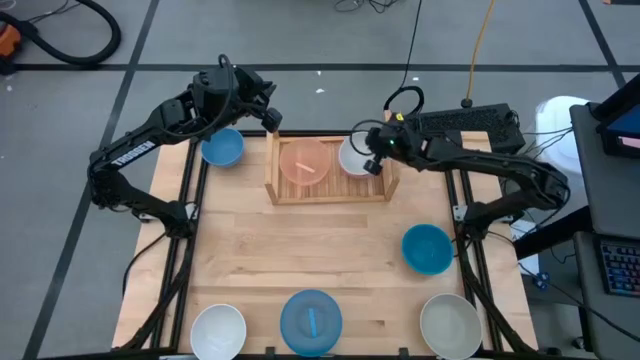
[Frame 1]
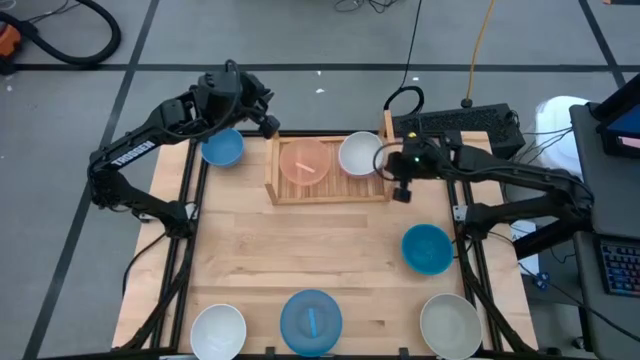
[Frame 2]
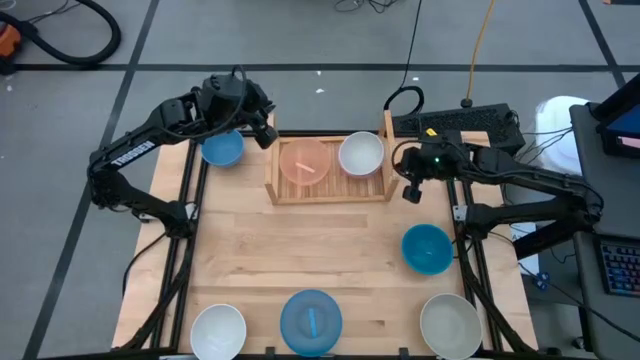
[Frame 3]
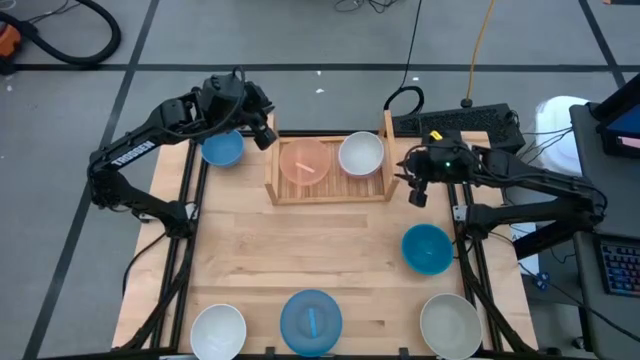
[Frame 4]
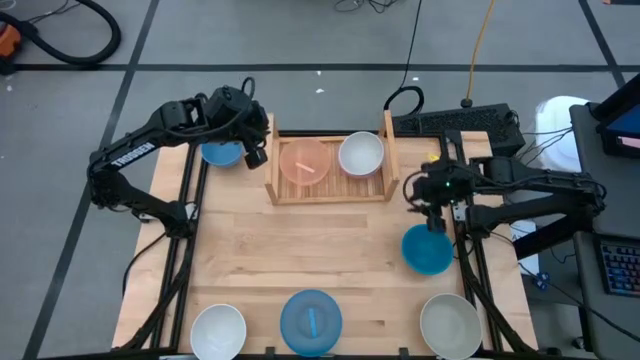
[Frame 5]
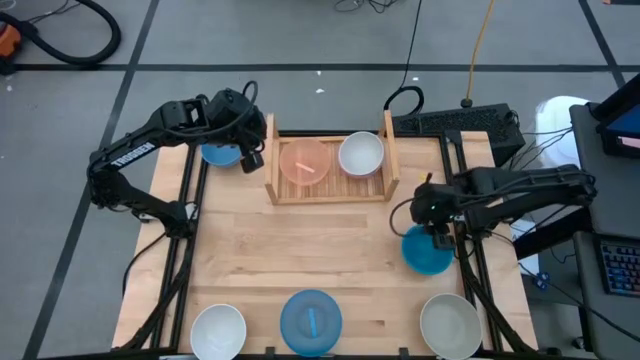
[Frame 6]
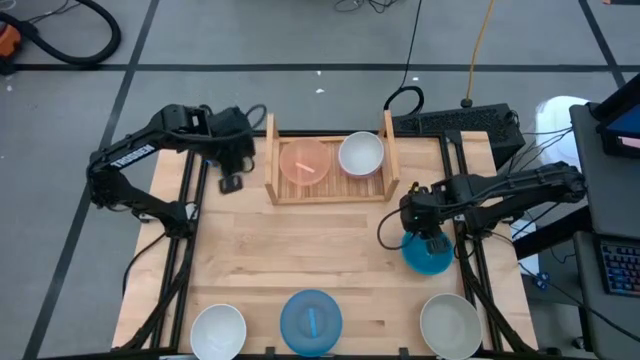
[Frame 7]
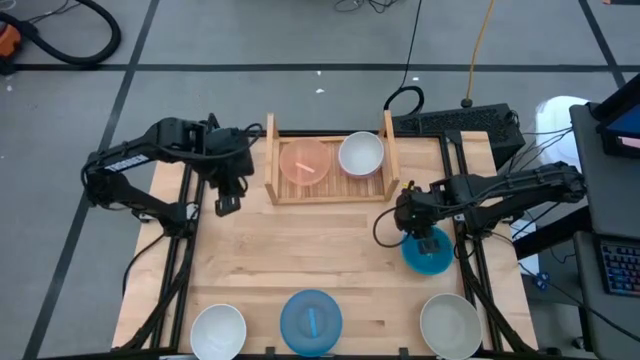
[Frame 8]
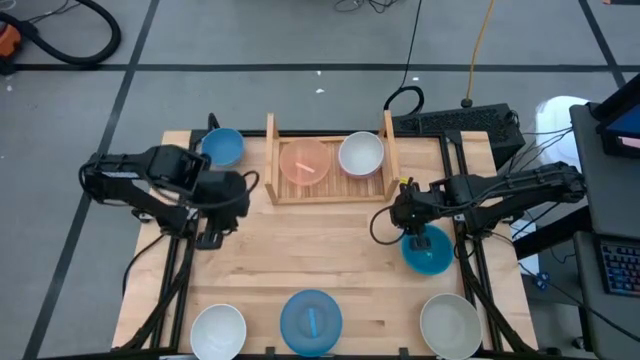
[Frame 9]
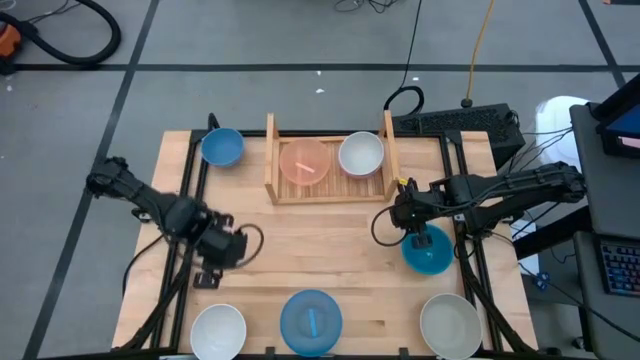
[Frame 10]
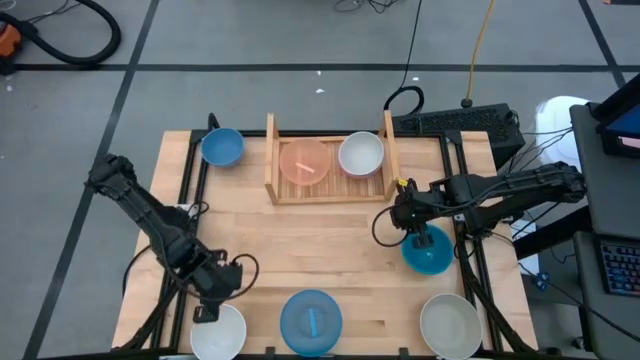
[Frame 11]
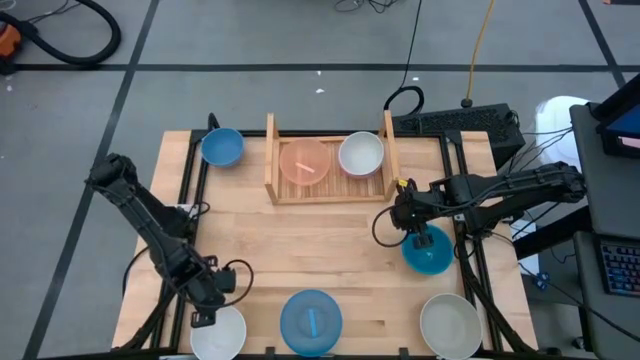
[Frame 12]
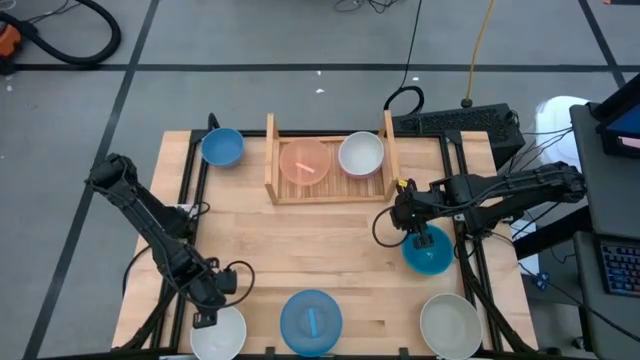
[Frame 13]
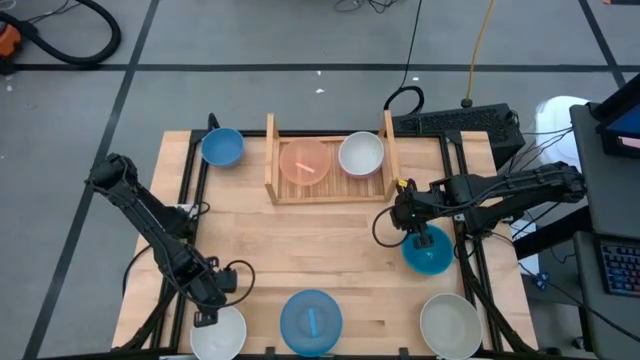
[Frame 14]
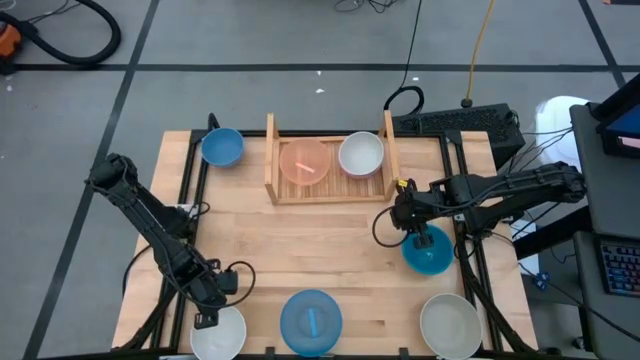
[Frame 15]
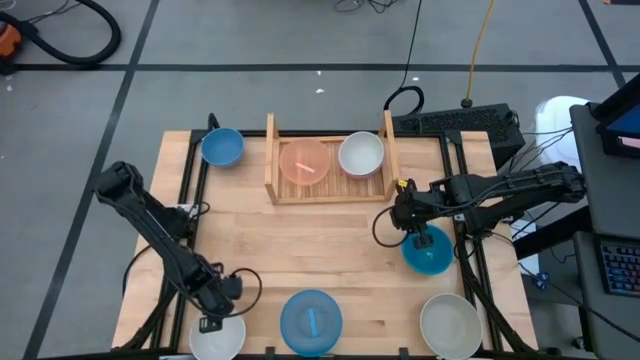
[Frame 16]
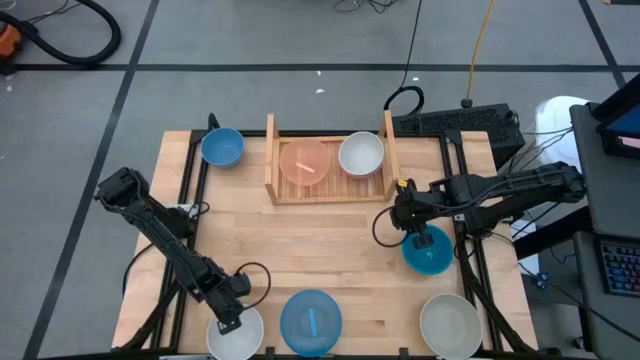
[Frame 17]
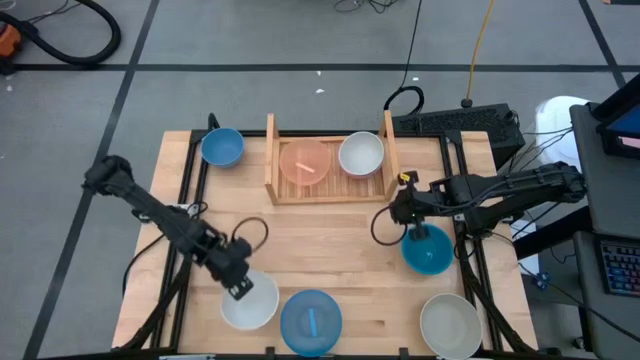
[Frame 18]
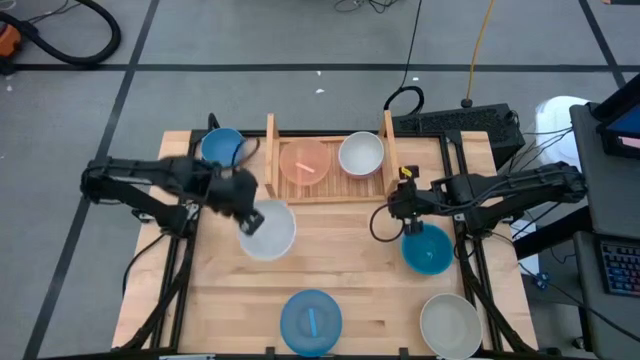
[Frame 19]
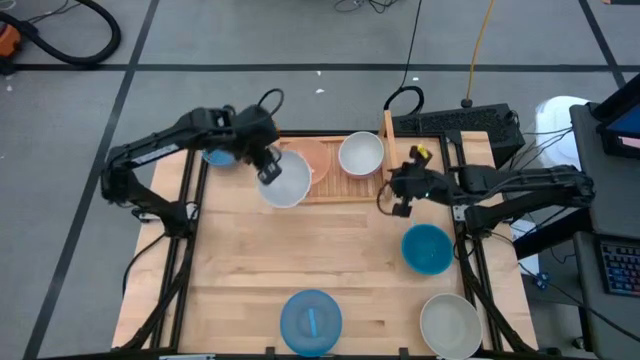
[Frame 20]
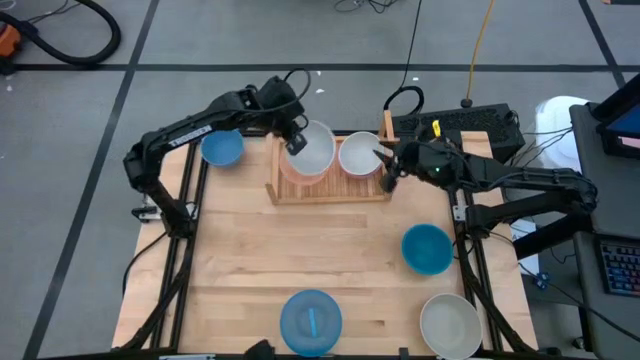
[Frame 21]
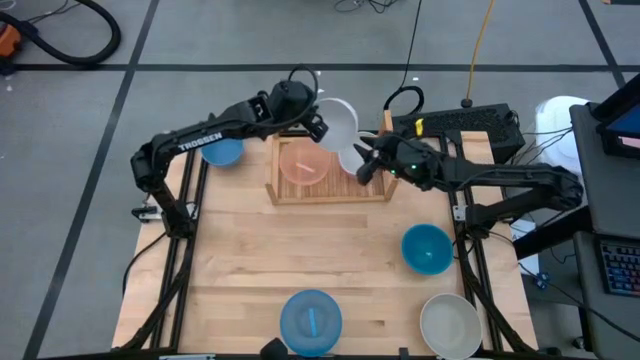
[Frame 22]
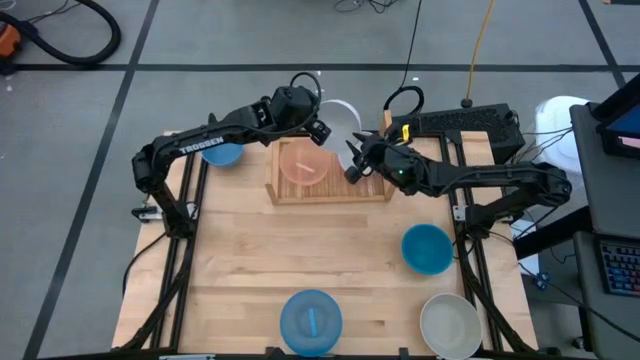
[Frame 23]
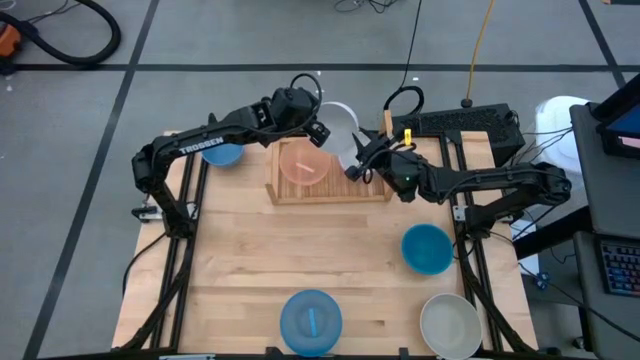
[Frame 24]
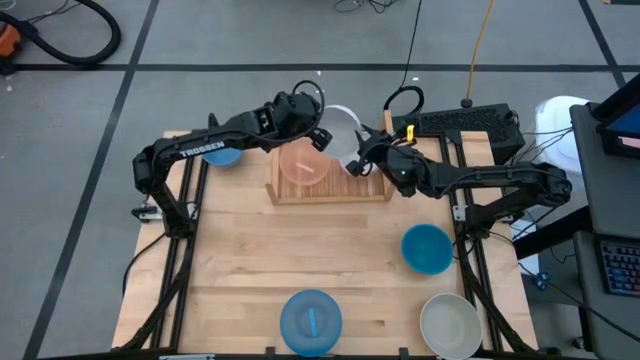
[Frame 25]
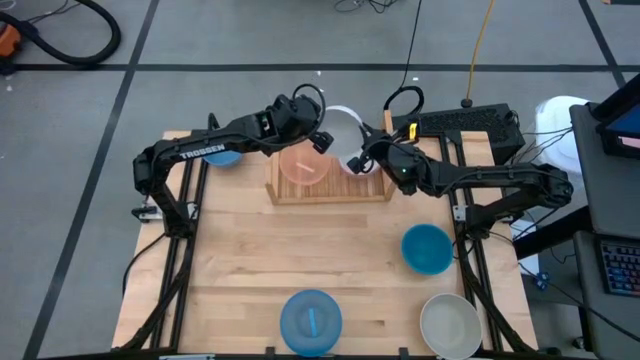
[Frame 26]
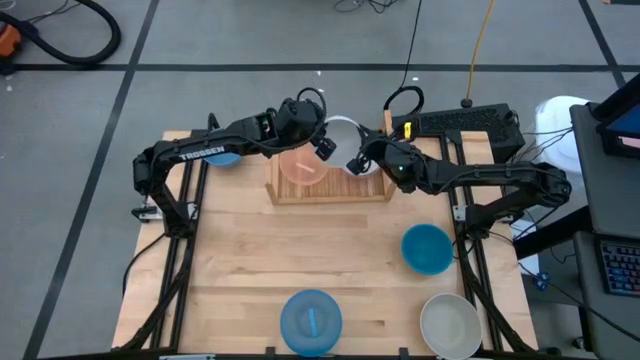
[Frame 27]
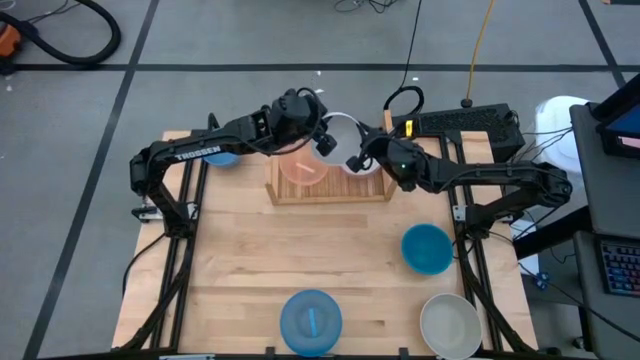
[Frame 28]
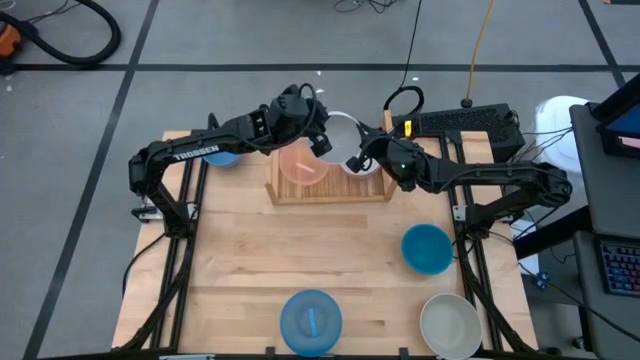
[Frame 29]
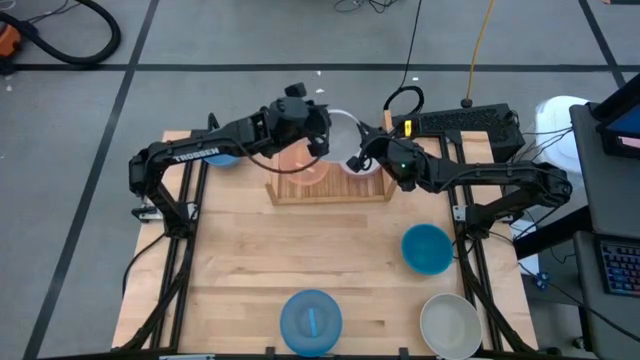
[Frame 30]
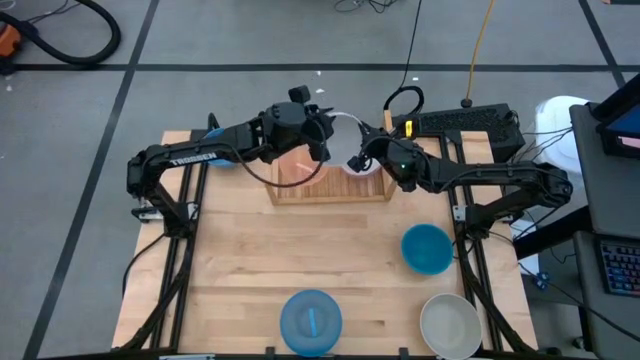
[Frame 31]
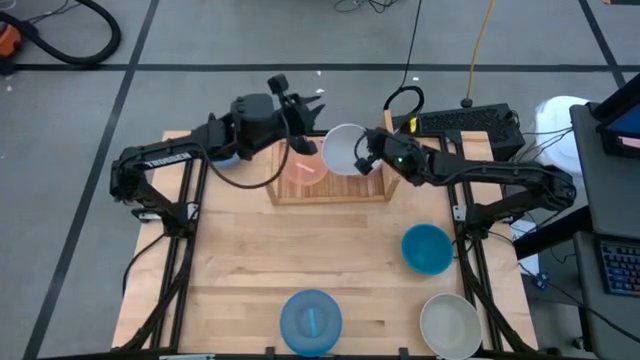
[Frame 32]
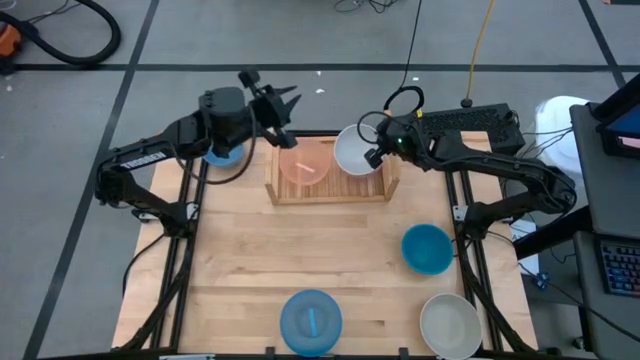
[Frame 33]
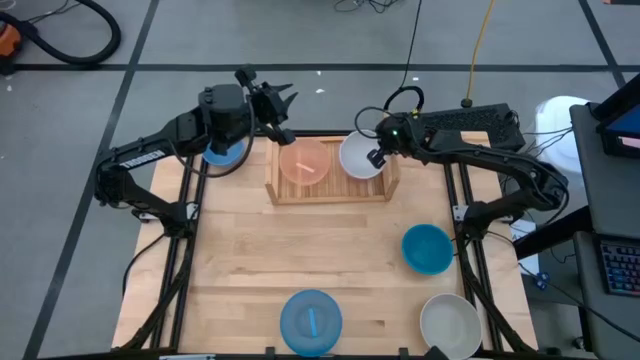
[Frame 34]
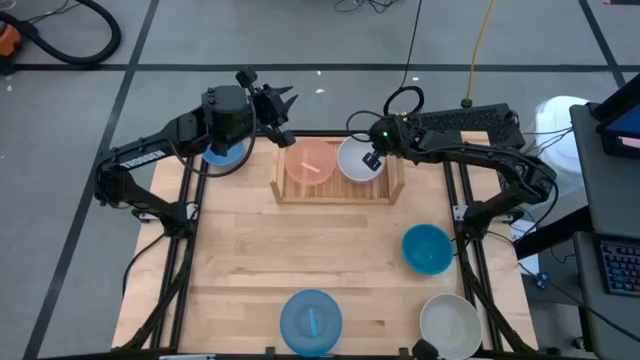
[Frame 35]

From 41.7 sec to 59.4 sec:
Task: Place and stack bowls onto a shelf
Stack the white bowl on top of the white bowl on the shelf

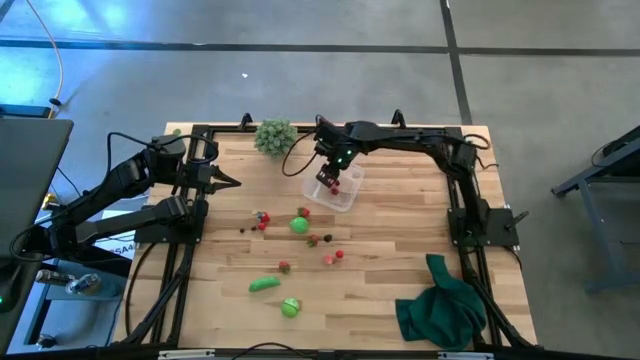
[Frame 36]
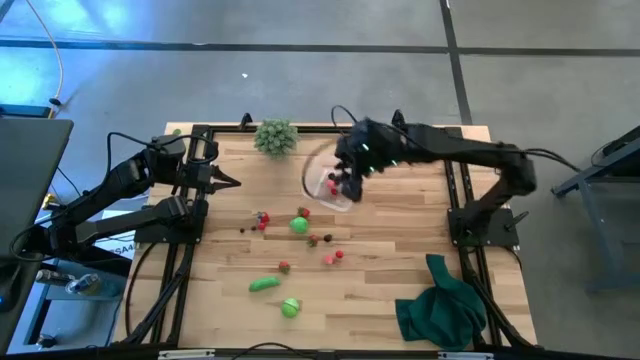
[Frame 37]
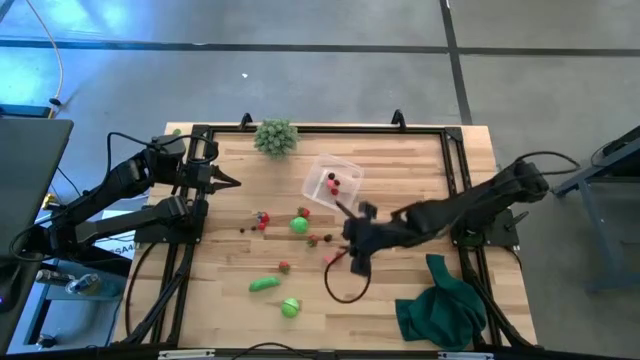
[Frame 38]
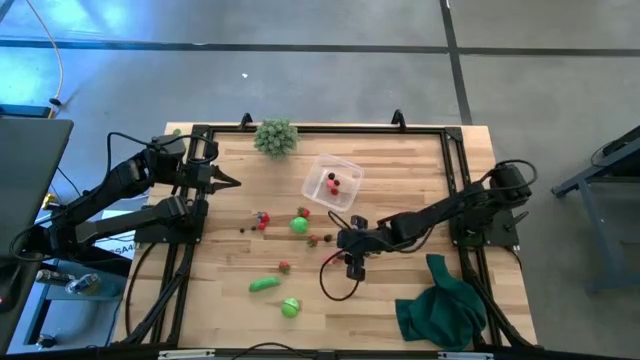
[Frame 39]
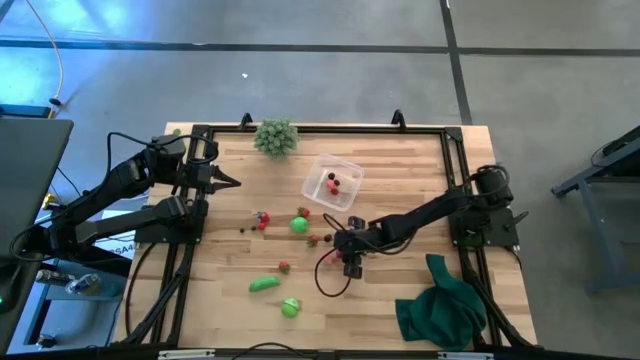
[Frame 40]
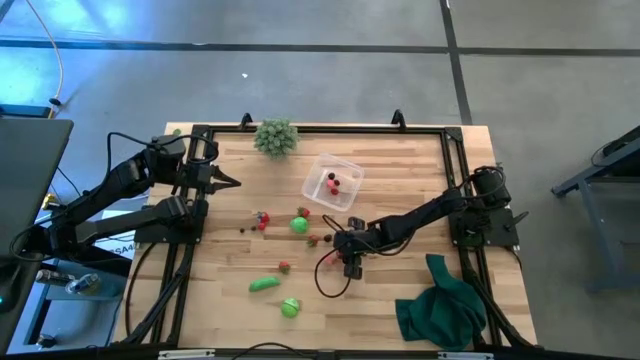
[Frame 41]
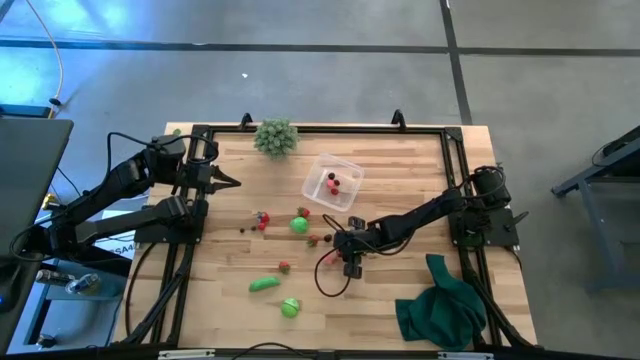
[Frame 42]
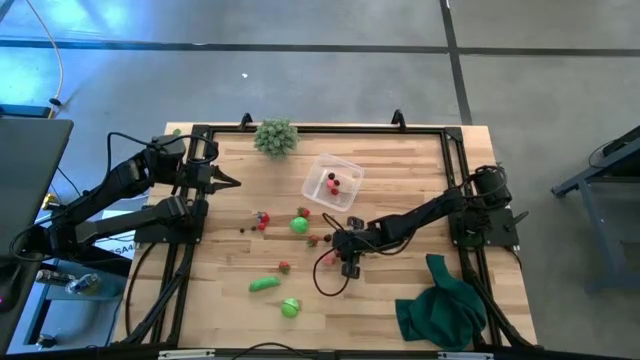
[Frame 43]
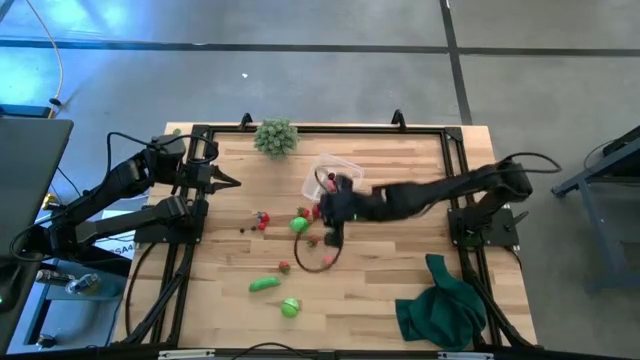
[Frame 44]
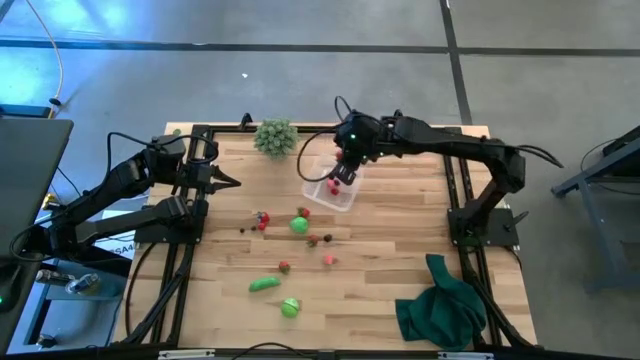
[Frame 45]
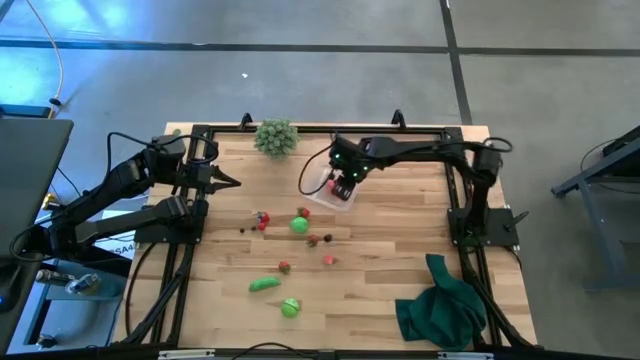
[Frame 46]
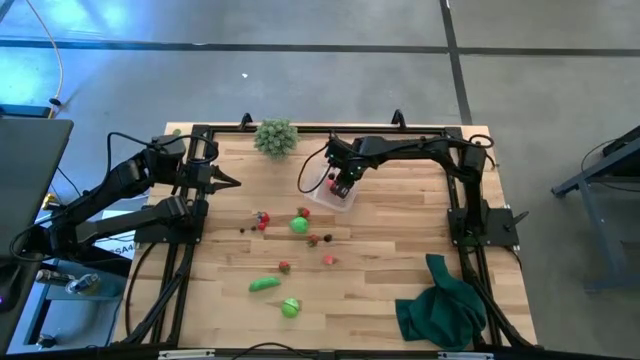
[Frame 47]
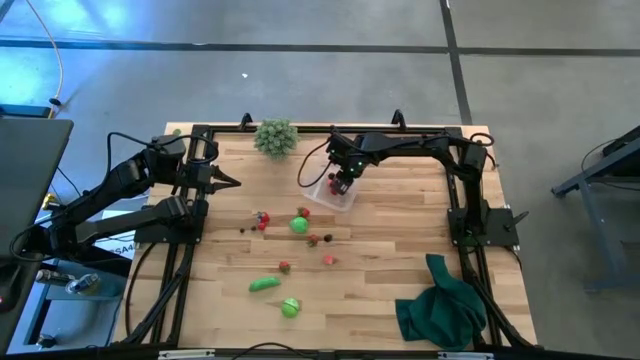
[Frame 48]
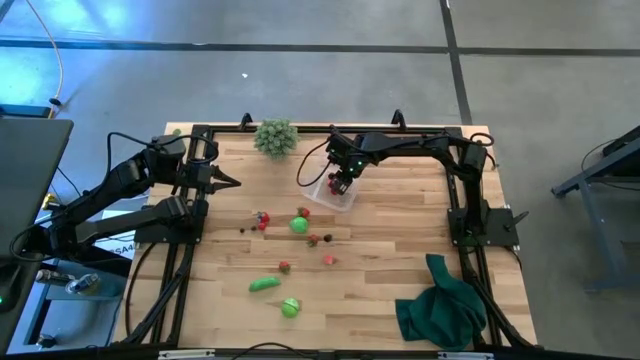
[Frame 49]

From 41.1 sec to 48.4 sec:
Task: Pick and placing Produce into tupperware
Put the red cherry into the transparent container
